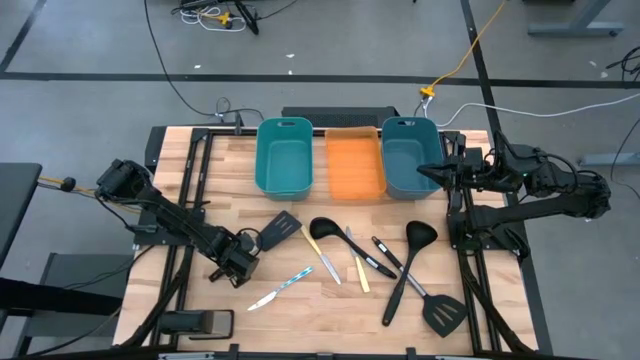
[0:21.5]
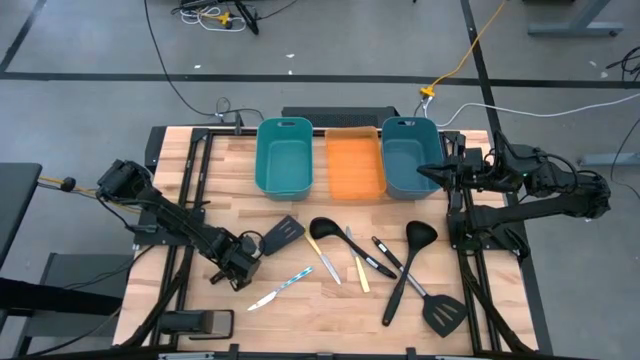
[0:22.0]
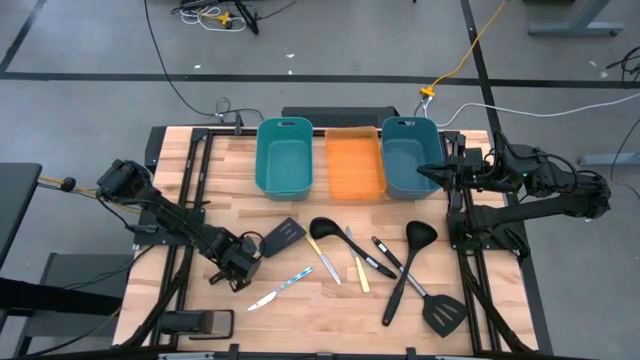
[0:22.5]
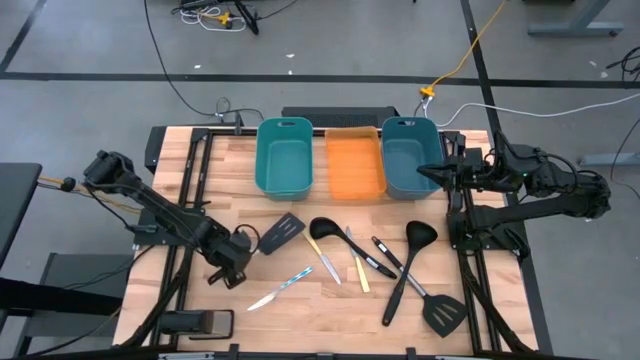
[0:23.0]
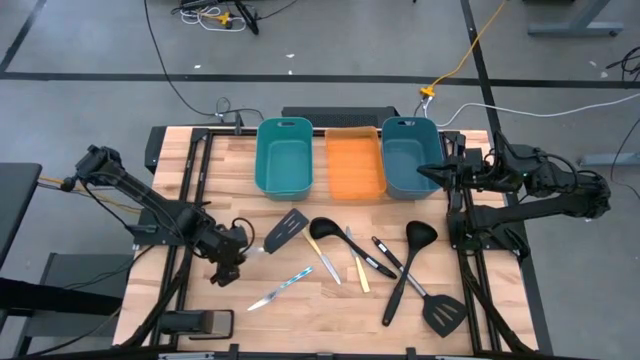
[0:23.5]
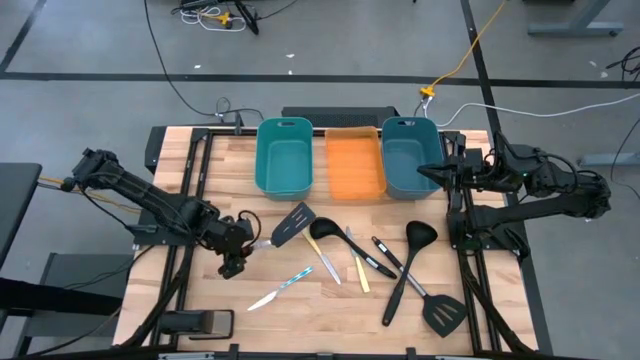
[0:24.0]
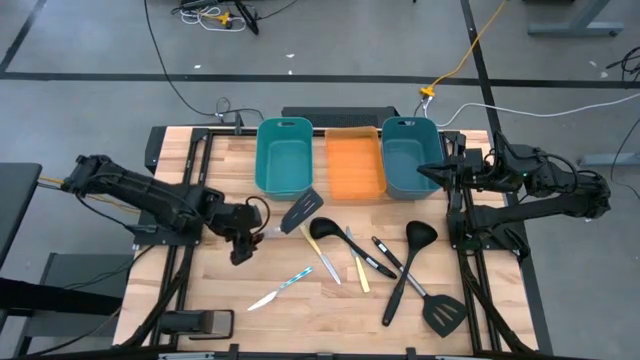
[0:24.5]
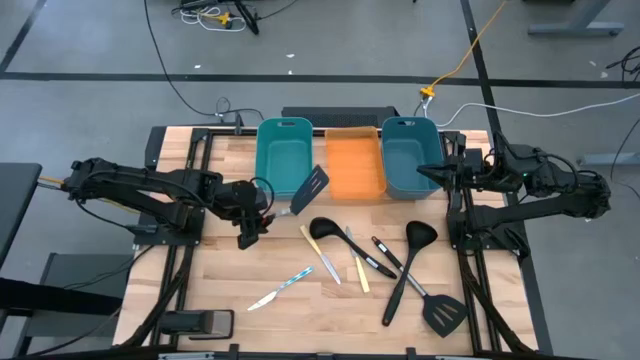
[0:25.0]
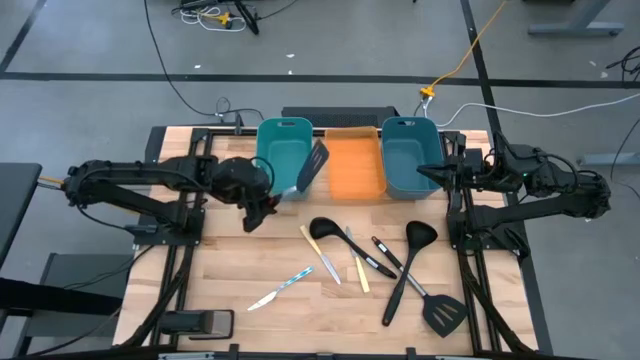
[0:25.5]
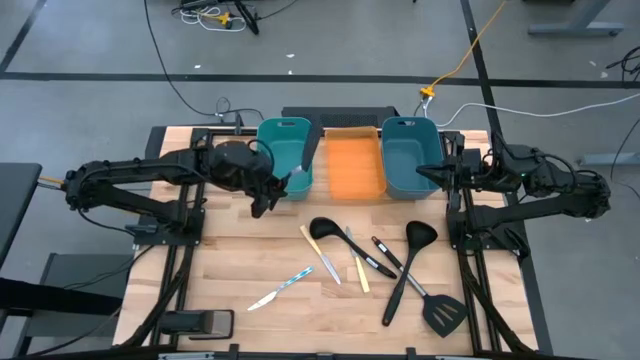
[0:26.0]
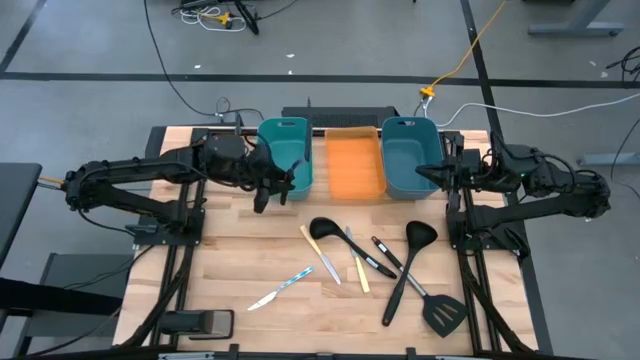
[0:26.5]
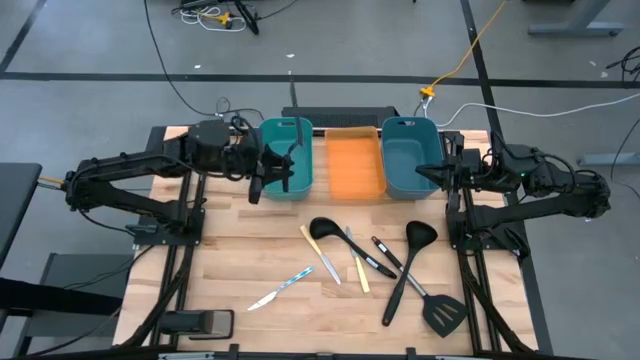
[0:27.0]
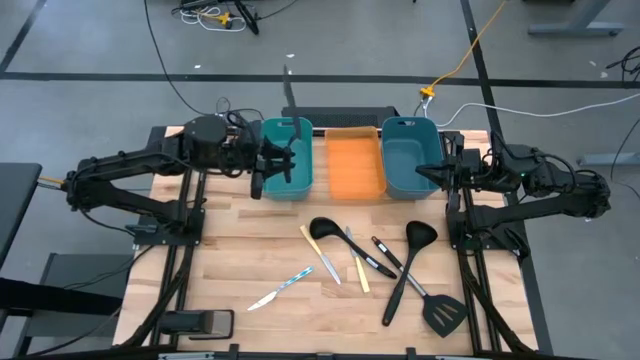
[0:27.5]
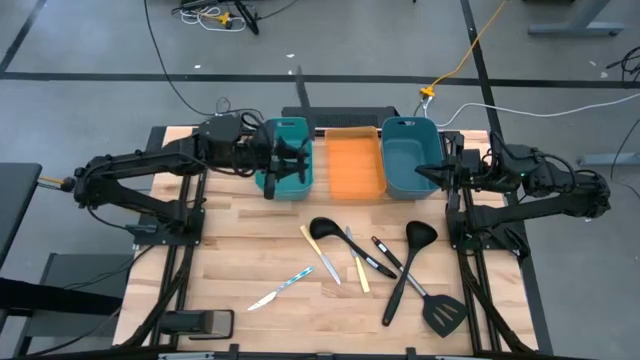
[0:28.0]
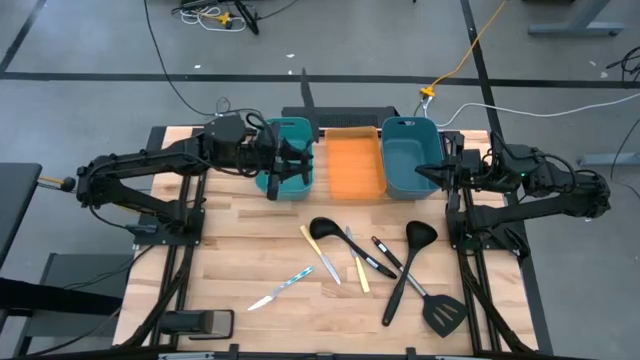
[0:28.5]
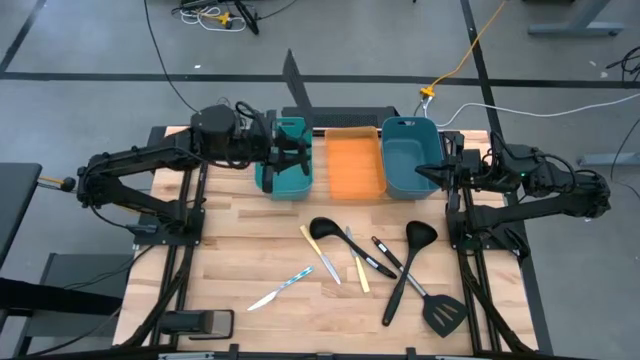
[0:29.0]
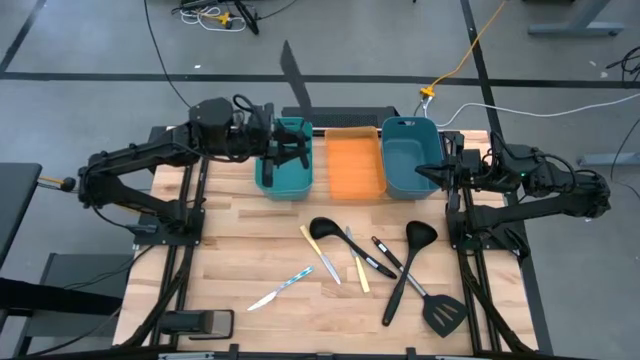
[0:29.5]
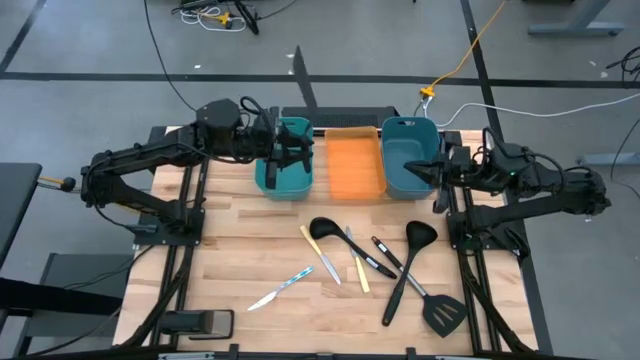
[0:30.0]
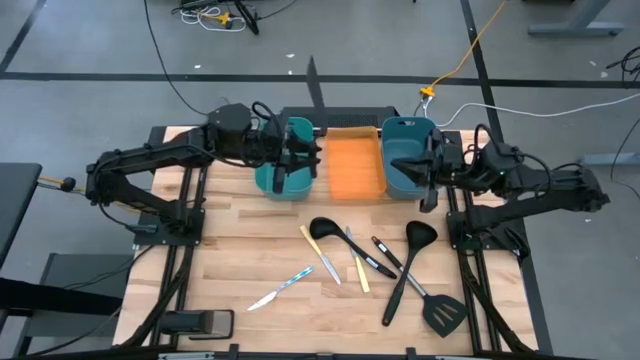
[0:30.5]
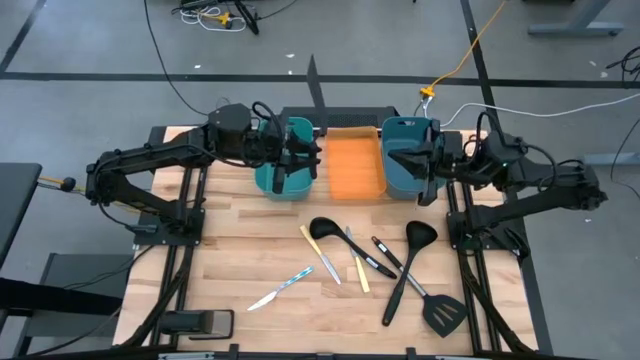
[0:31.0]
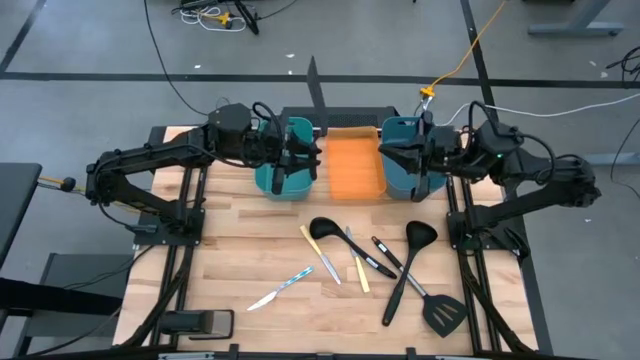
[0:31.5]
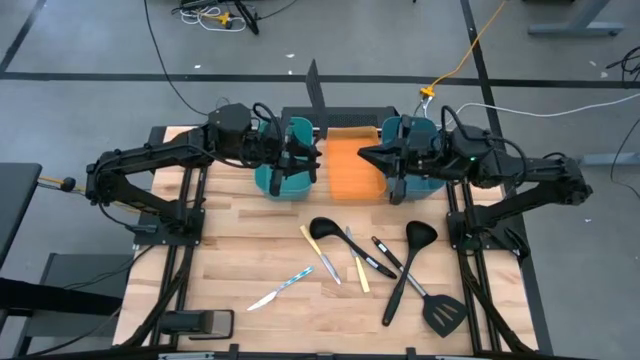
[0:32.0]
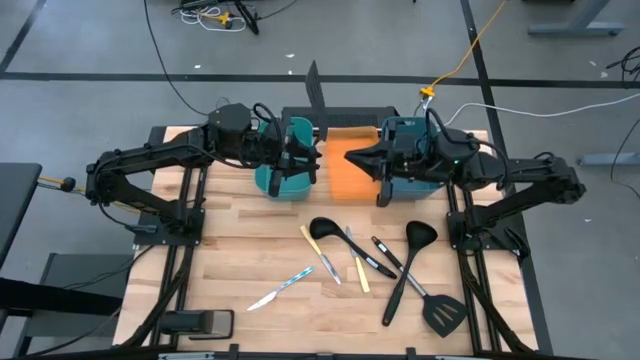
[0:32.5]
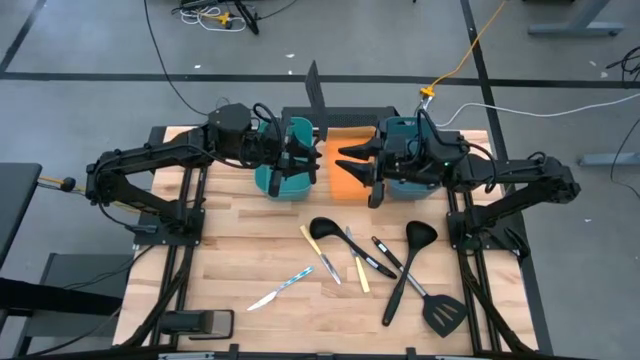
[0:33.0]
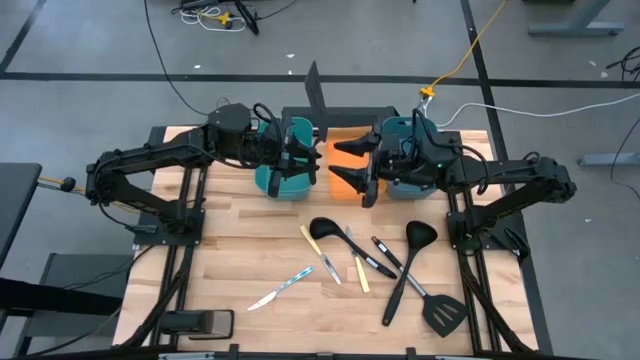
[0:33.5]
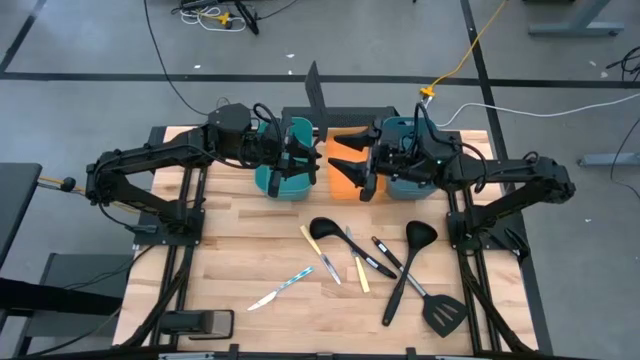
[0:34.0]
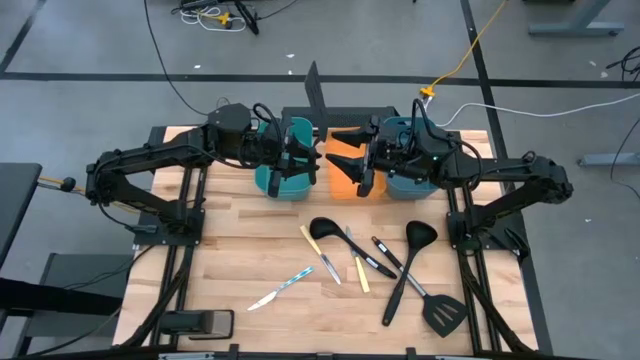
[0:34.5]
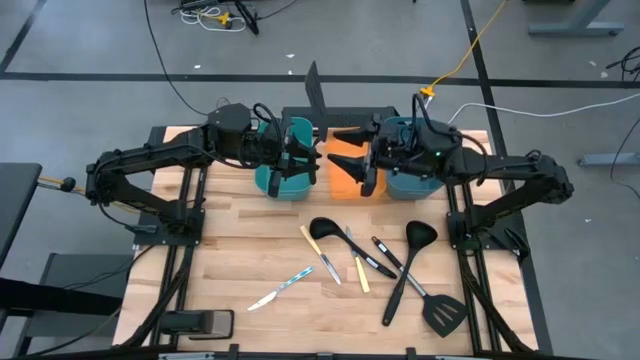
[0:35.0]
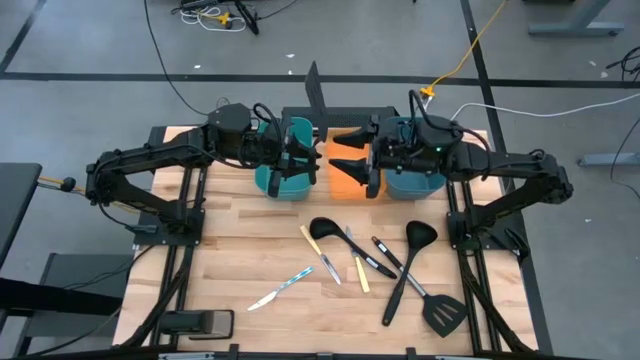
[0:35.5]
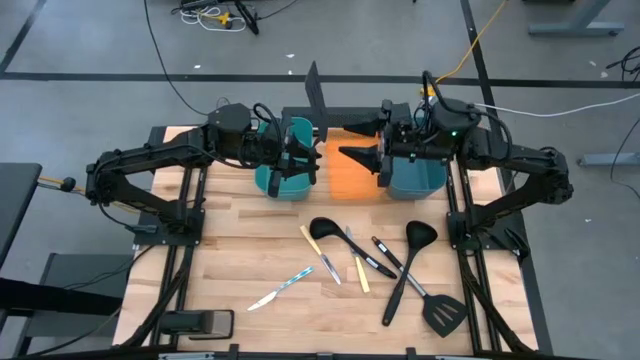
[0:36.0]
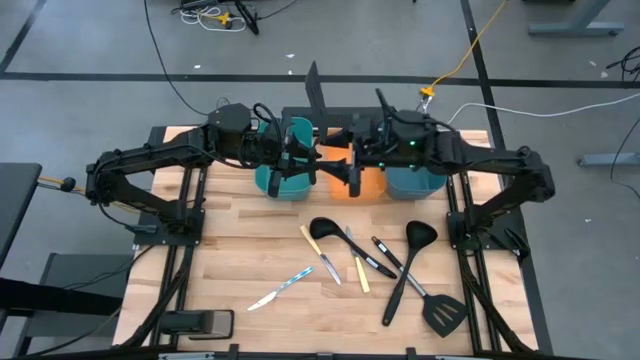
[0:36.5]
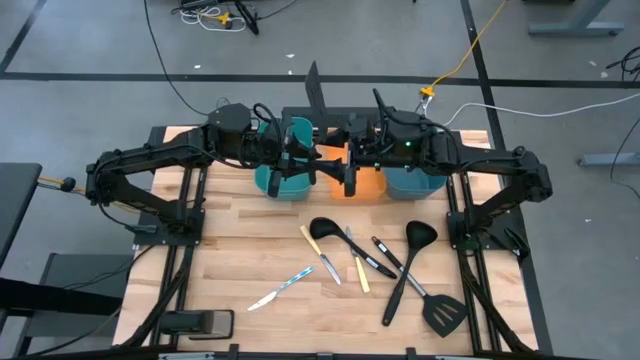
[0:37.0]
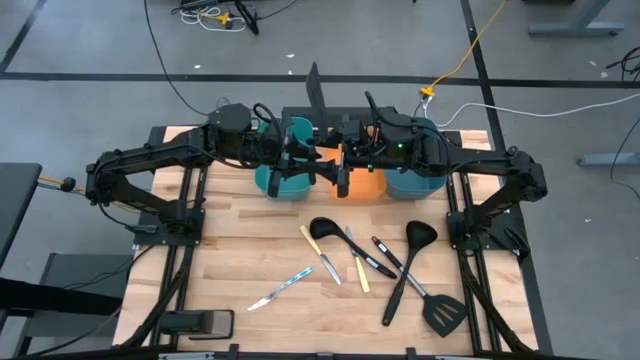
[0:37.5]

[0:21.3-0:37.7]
Task: Pick & Place Kitchen Items
Put the left black spatula into the blue bin
